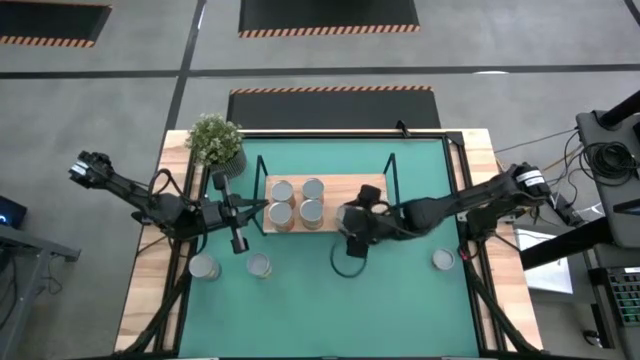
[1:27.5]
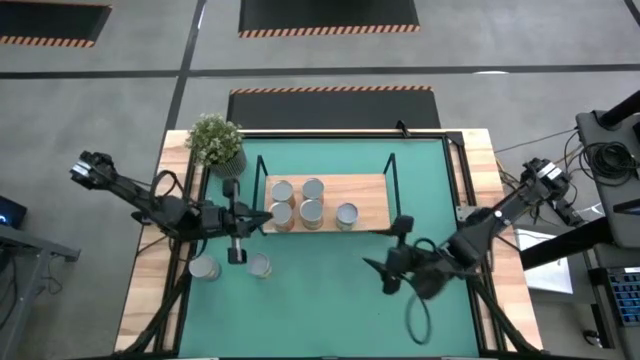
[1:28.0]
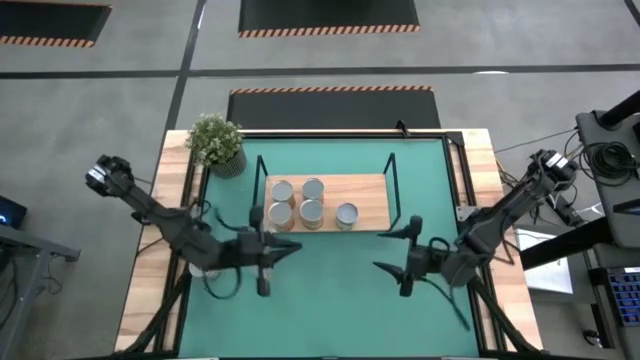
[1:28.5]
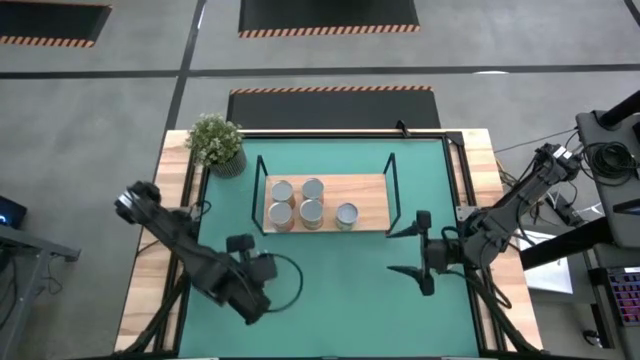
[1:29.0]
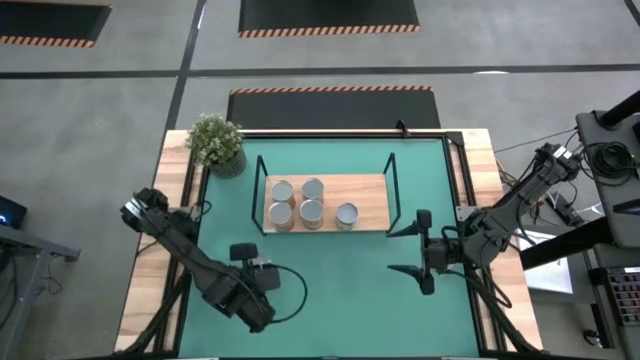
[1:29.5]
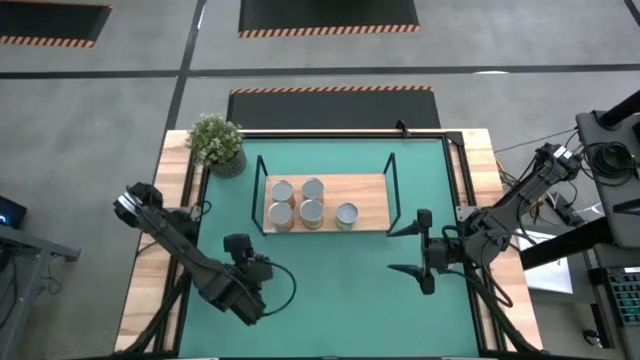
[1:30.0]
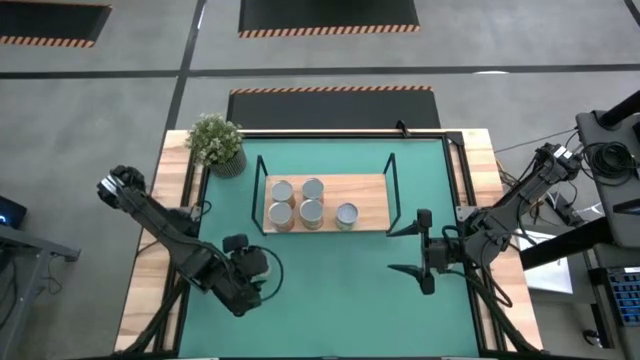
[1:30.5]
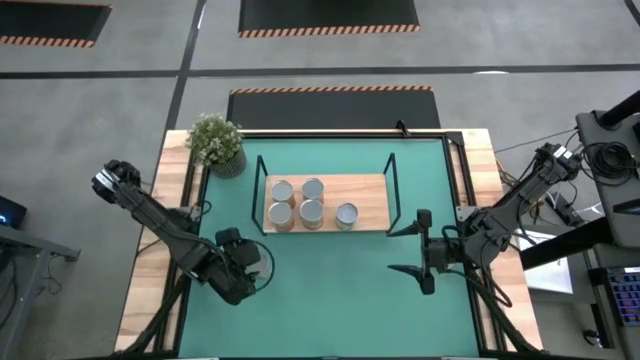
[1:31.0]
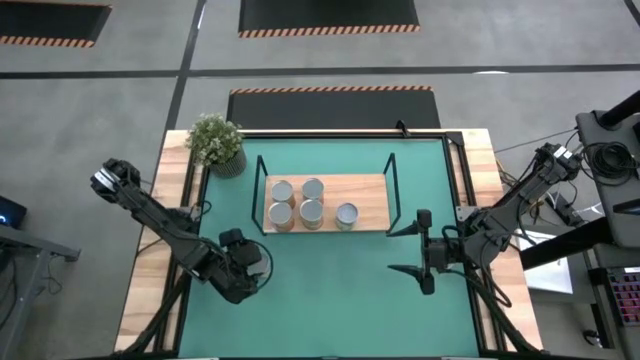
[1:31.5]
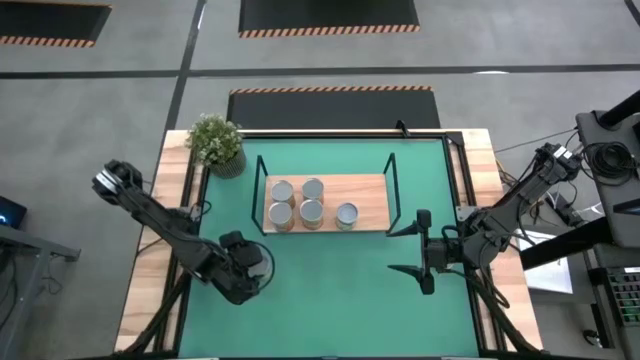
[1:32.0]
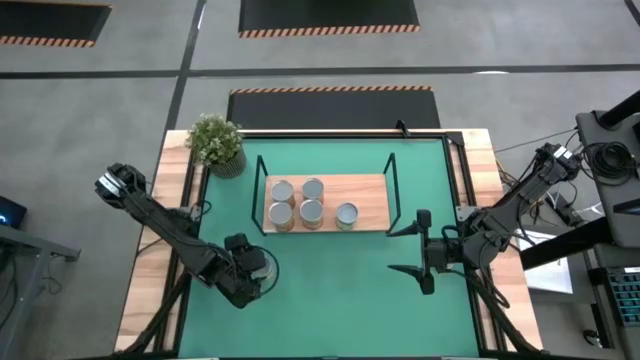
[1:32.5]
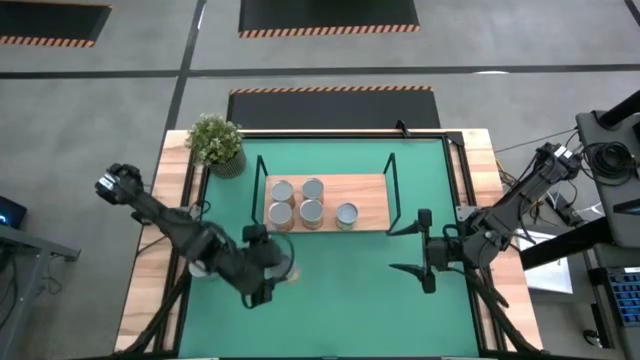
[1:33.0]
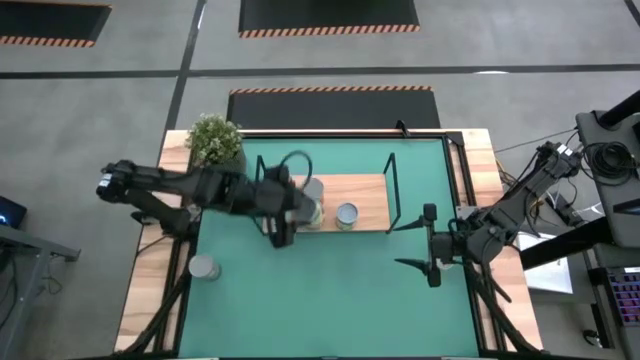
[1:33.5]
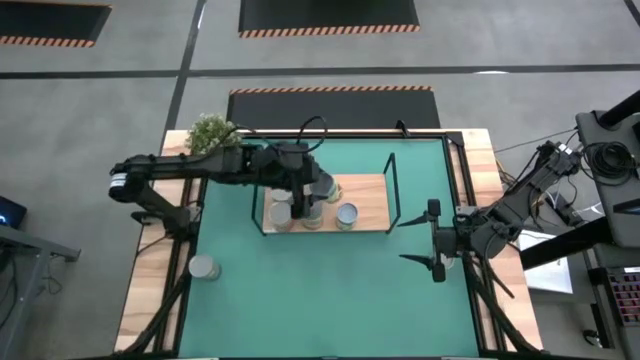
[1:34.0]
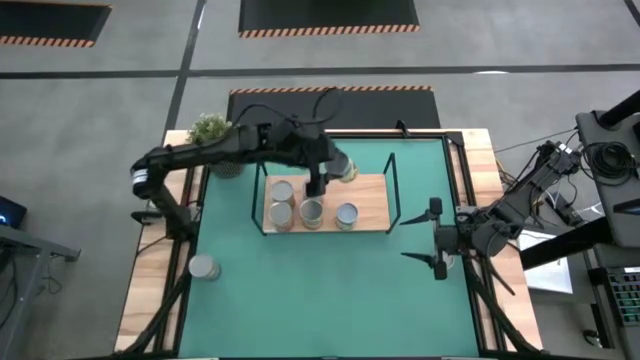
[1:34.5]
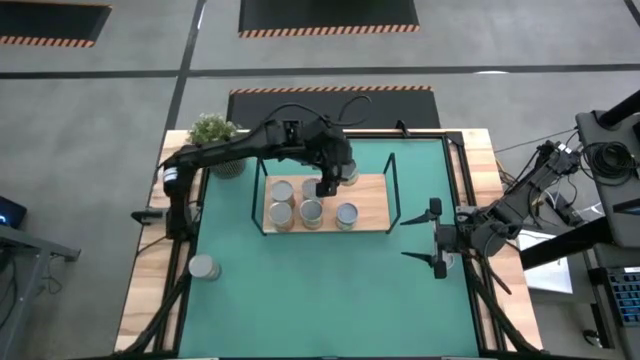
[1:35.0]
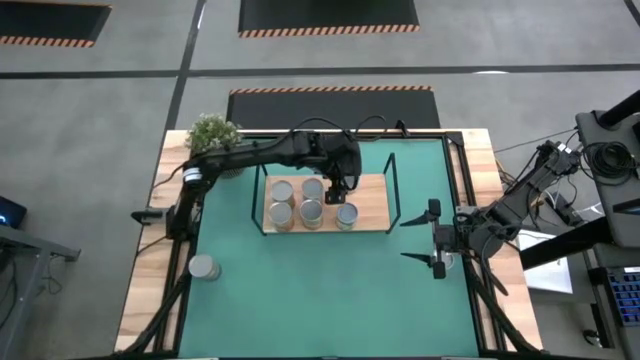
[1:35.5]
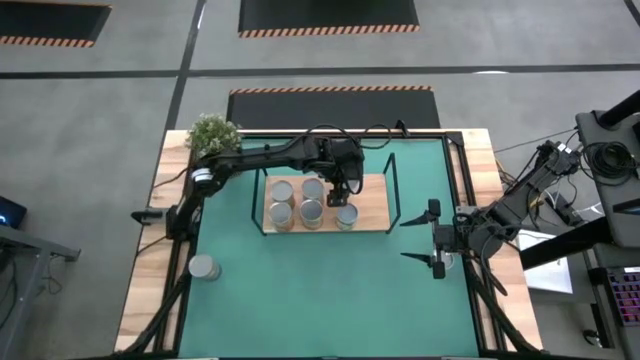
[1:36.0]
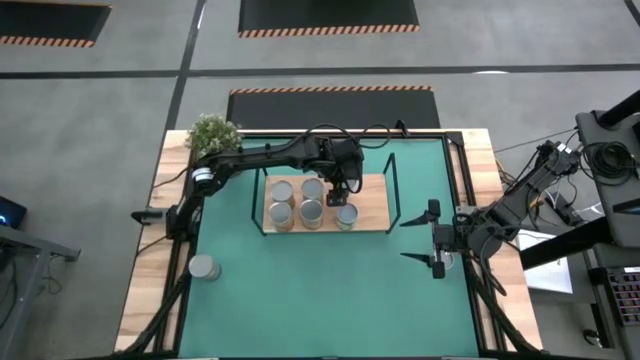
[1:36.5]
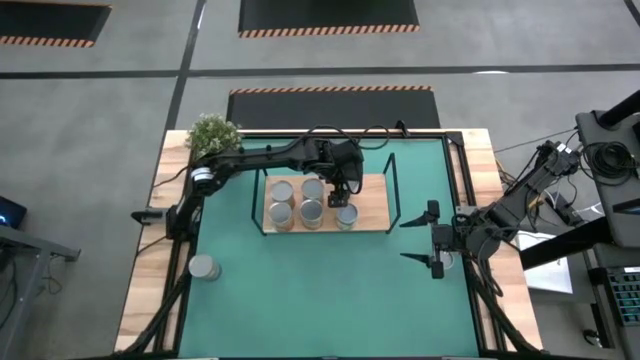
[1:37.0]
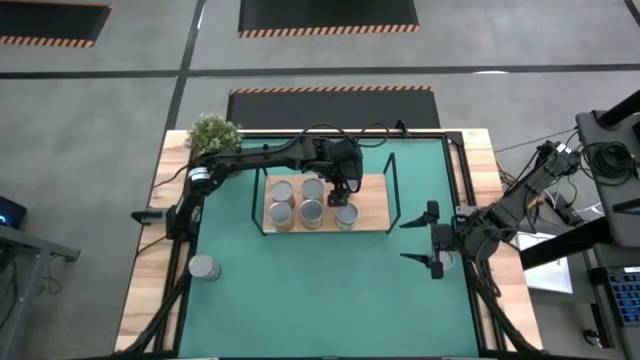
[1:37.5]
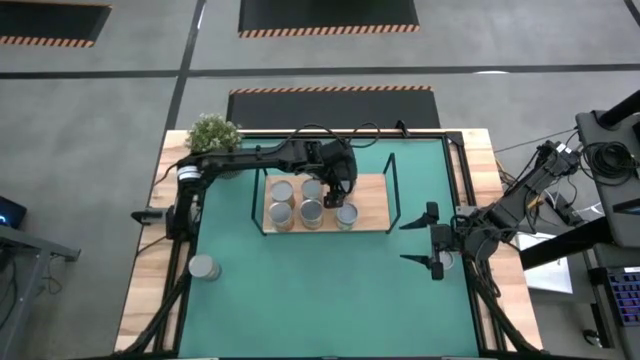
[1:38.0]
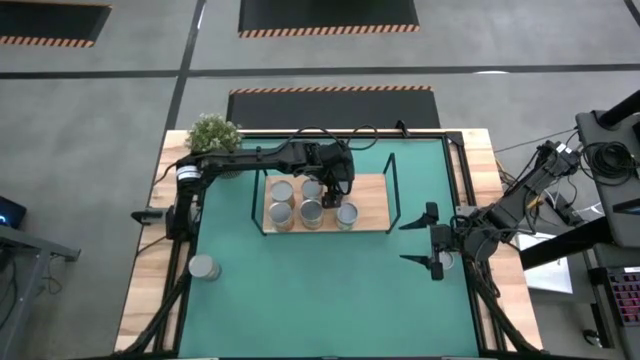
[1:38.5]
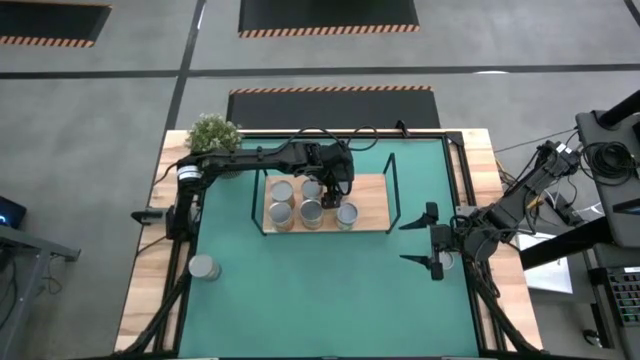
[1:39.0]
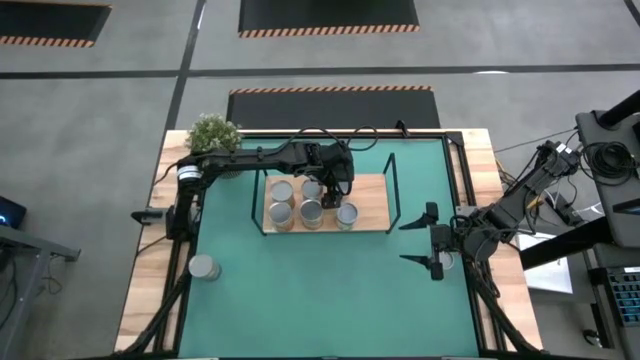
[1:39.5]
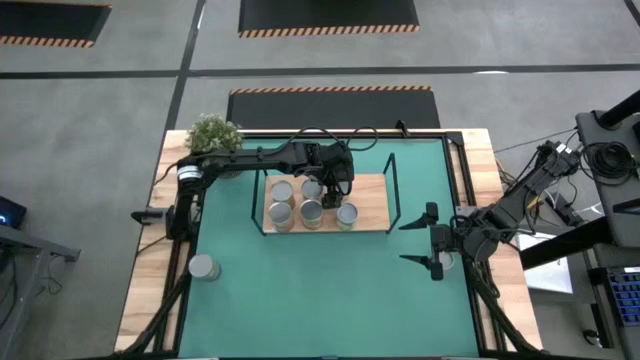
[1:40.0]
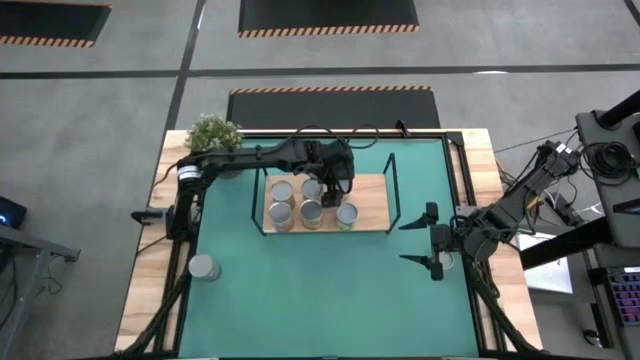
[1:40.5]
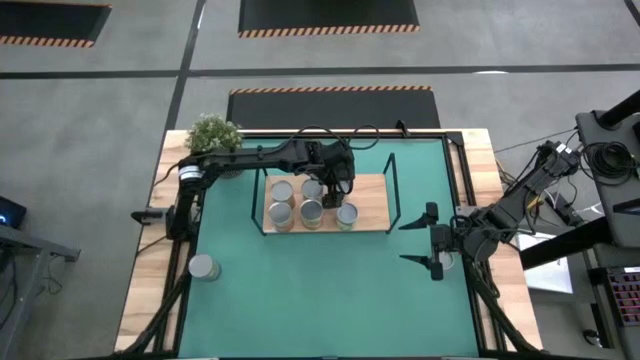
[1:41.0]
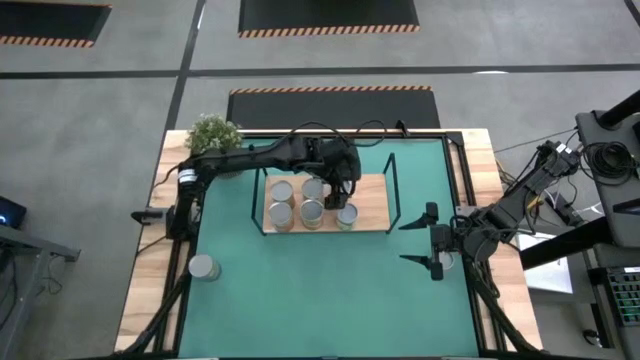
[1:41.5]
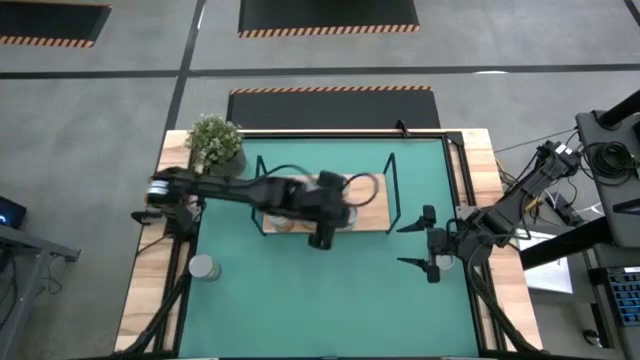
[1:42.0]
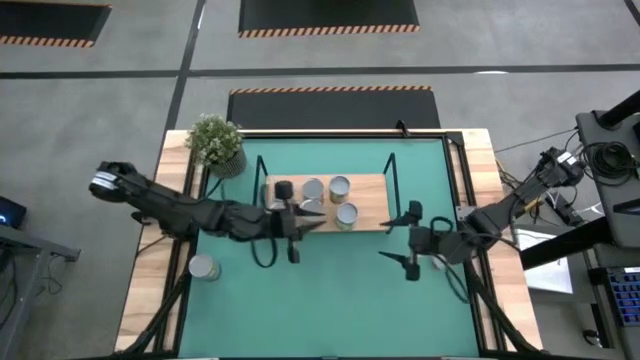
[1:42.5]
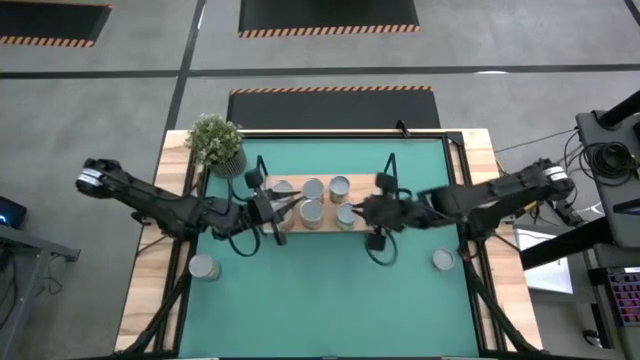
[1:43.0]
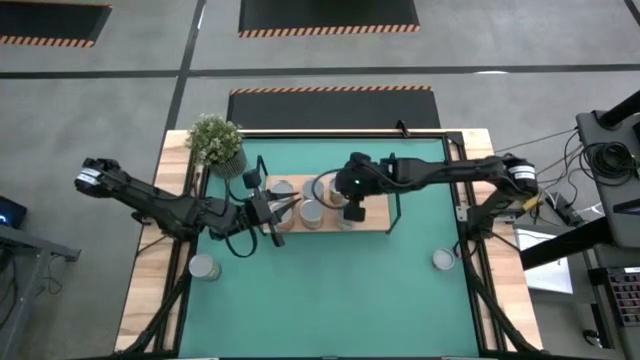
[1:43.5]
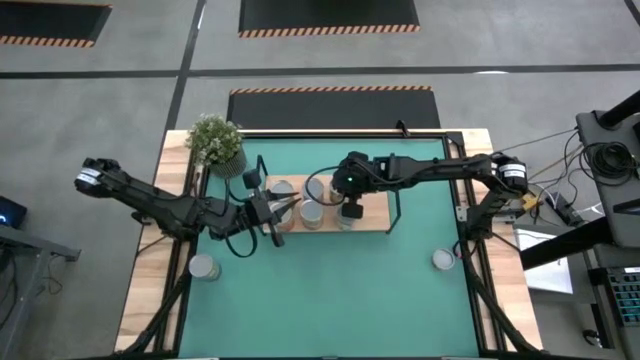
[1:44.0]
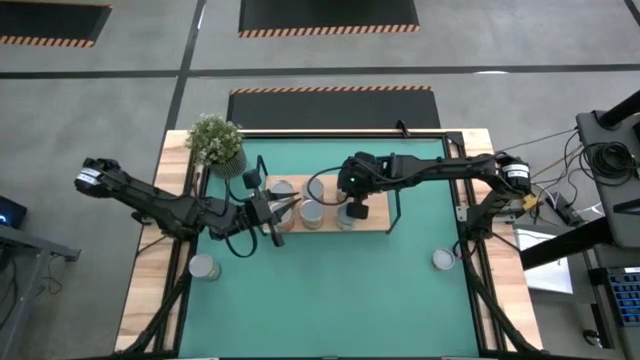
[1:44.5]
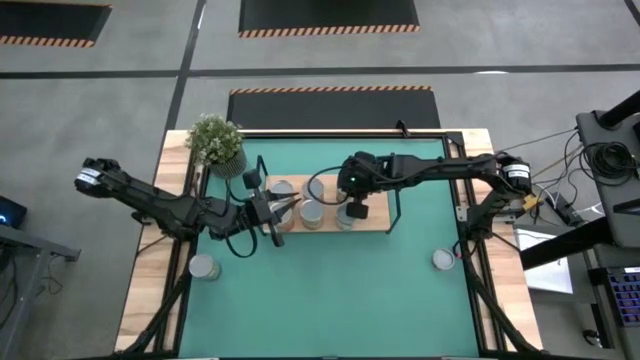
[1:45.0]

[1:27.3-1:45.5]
Task: Pick and place cans onto a shelf
Put the canned spaghetti sauce on the shelf

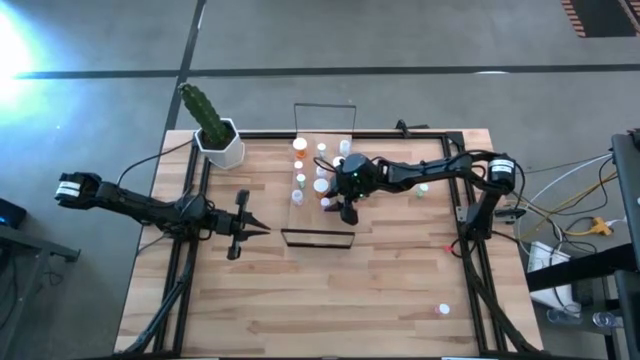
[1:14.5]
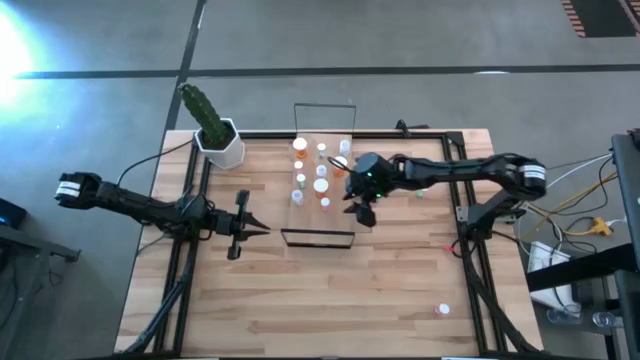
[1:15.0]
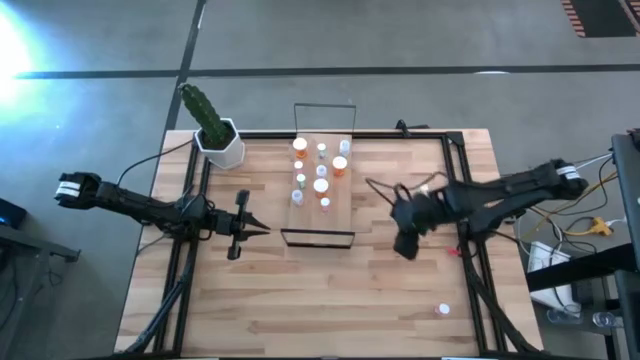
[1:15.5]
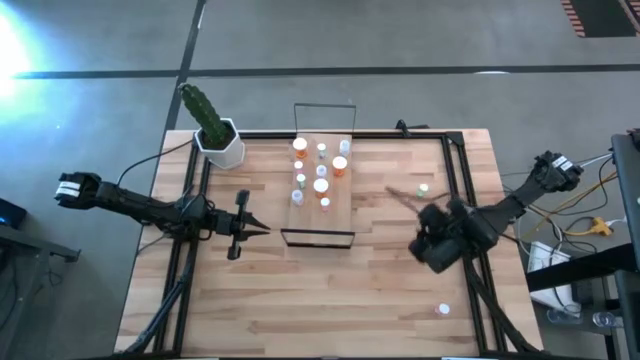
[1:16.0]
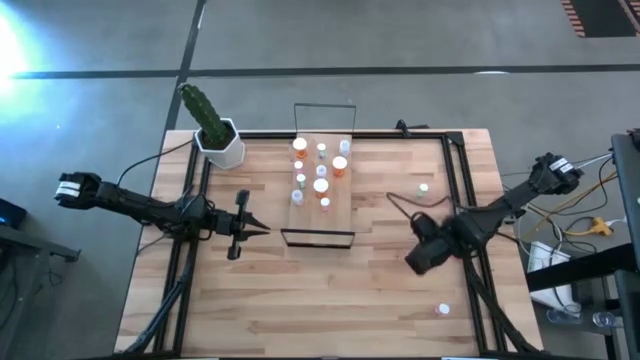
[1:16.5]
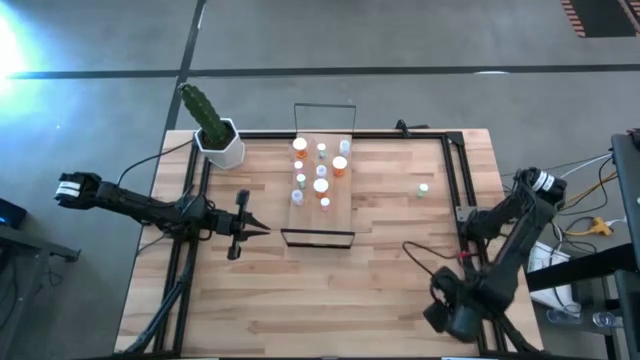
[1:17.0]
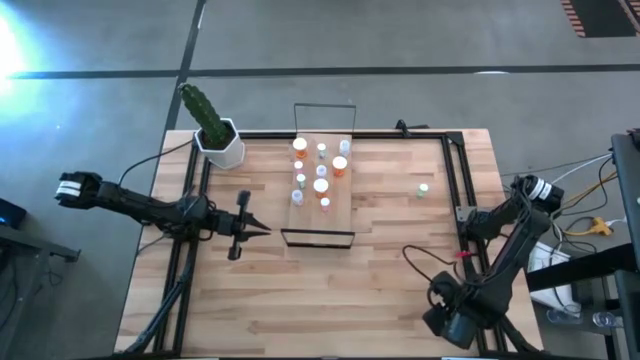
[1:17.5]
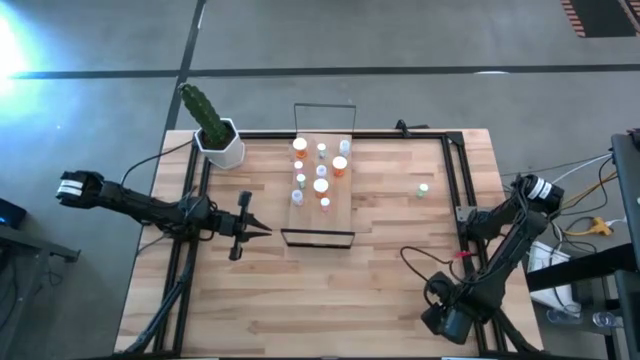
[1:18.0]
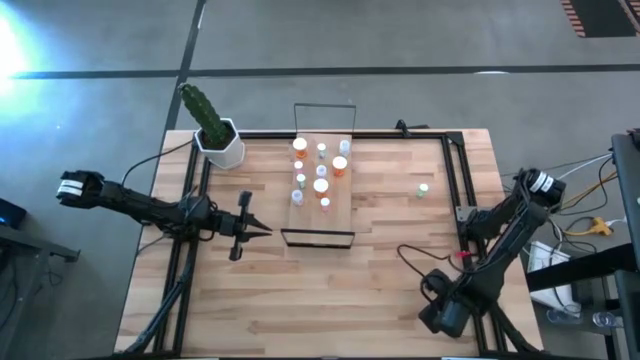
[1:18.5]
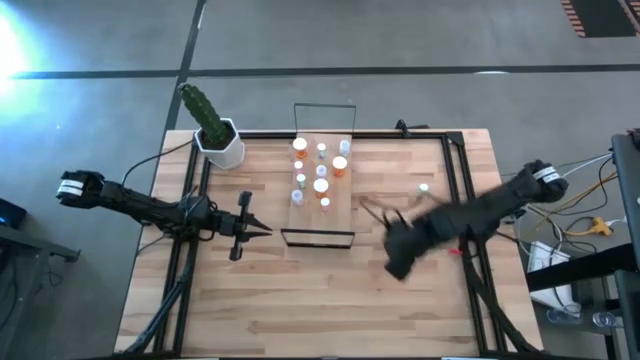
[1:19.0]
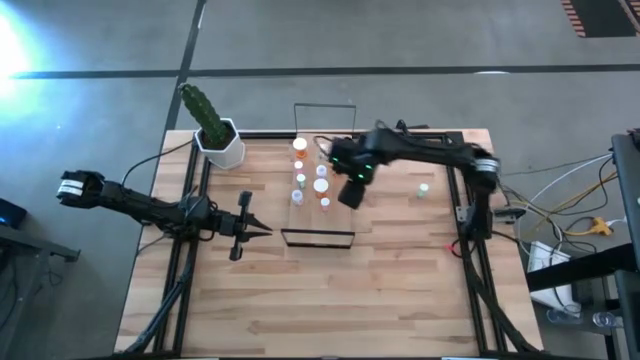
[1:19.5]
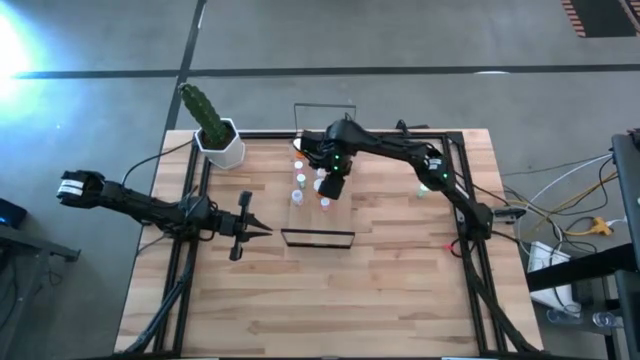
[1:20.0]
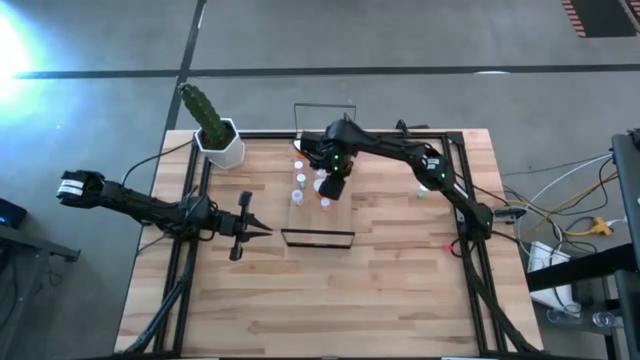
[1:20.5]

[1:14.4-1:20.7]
Task: Pick and place medicine bottles onto shelf by color
Put the pink transparent pill bottle on the shelf
